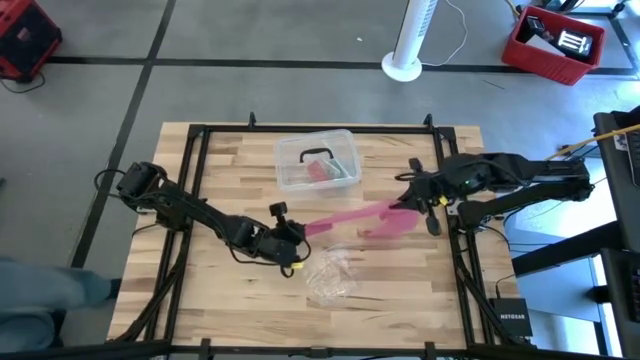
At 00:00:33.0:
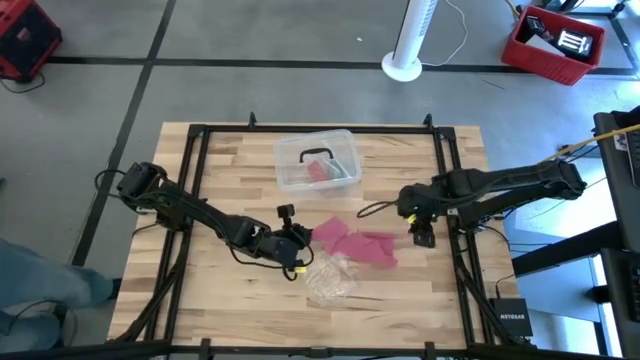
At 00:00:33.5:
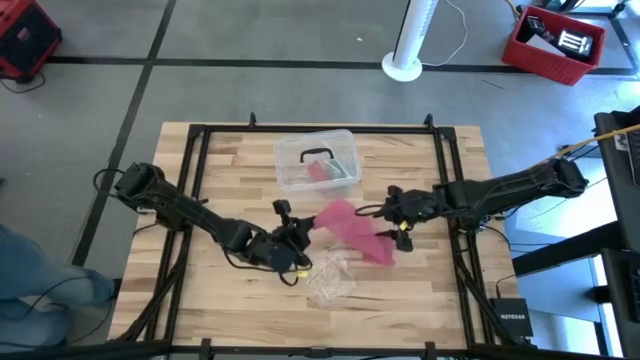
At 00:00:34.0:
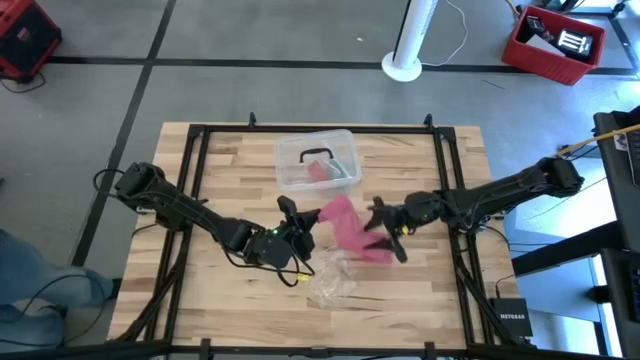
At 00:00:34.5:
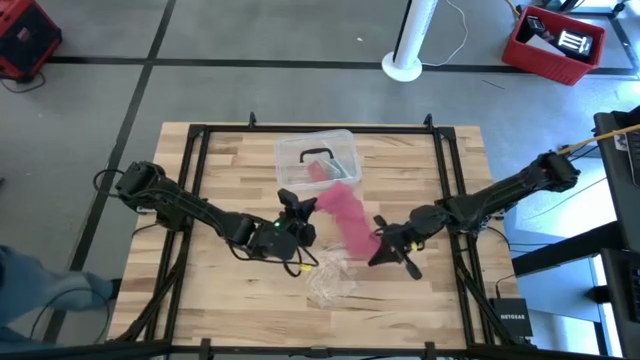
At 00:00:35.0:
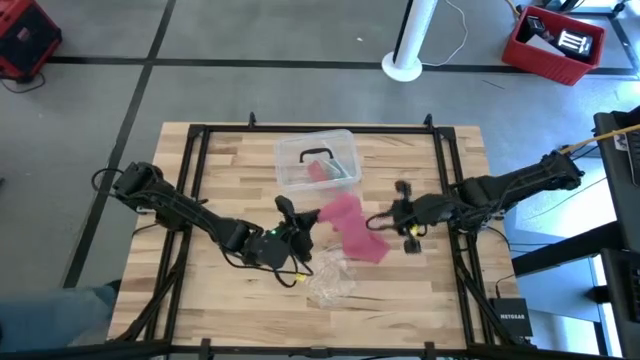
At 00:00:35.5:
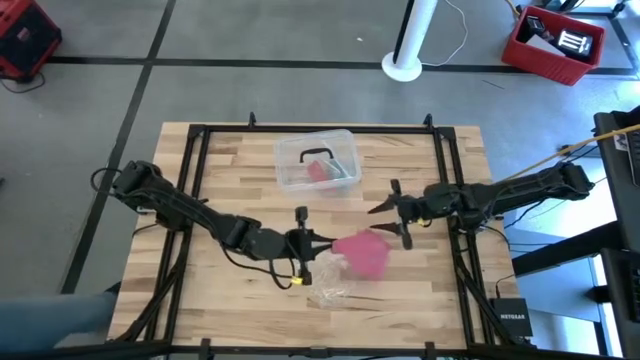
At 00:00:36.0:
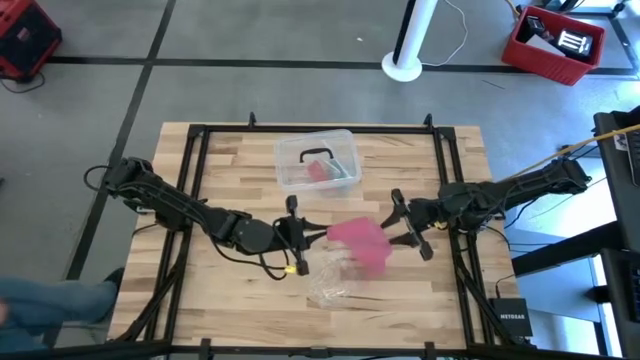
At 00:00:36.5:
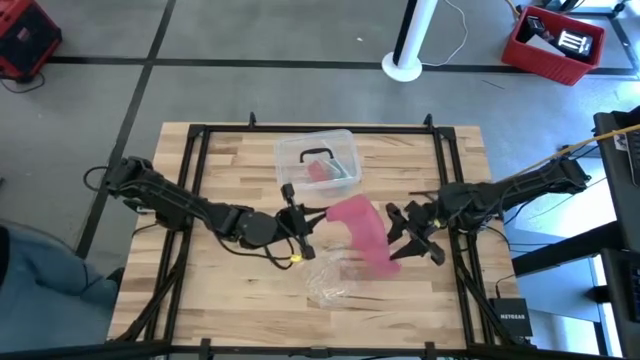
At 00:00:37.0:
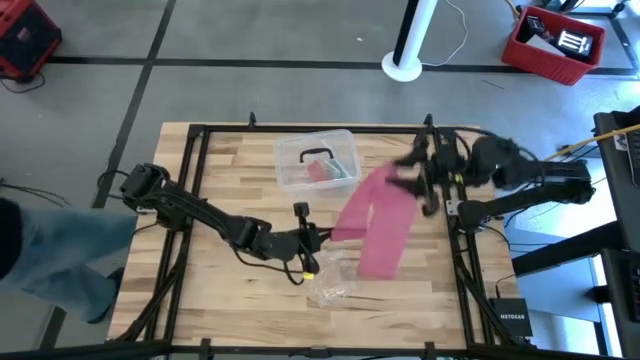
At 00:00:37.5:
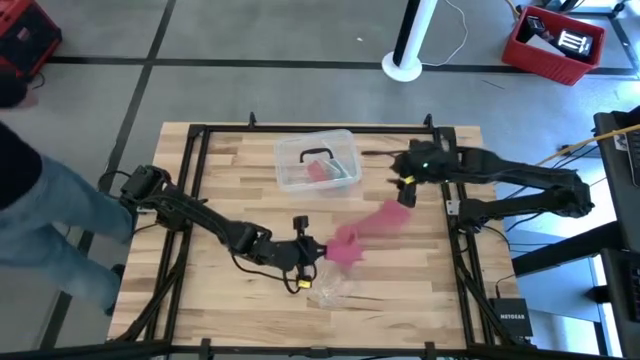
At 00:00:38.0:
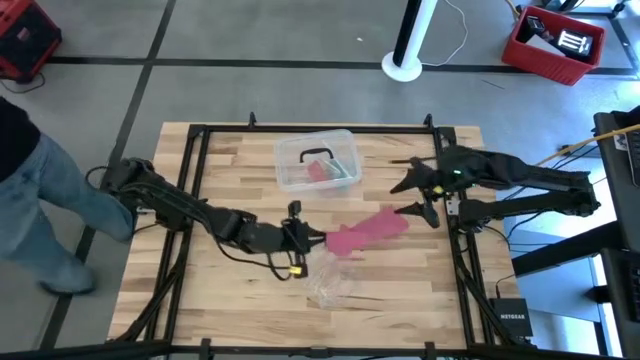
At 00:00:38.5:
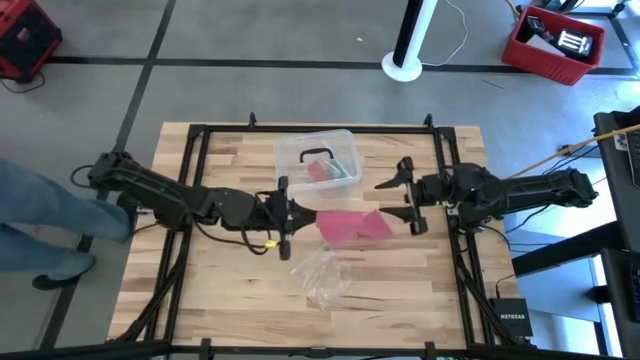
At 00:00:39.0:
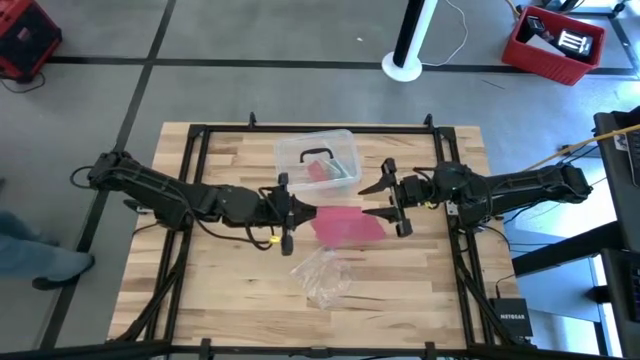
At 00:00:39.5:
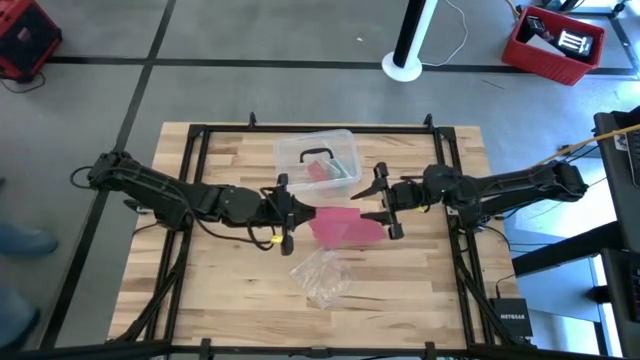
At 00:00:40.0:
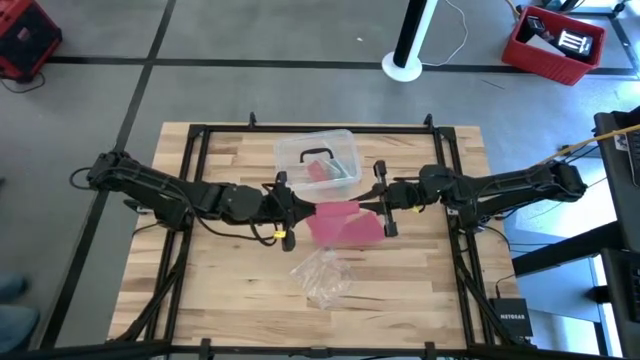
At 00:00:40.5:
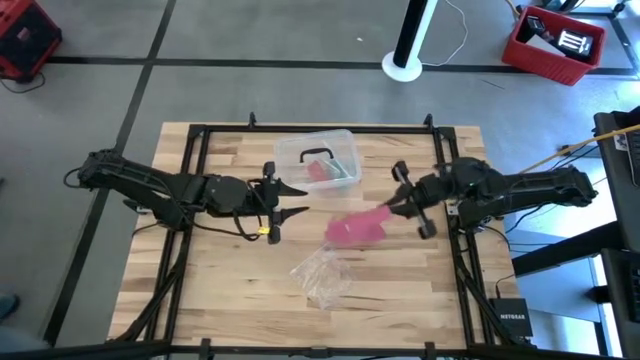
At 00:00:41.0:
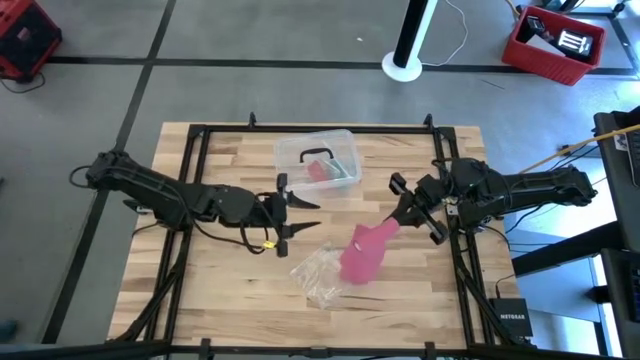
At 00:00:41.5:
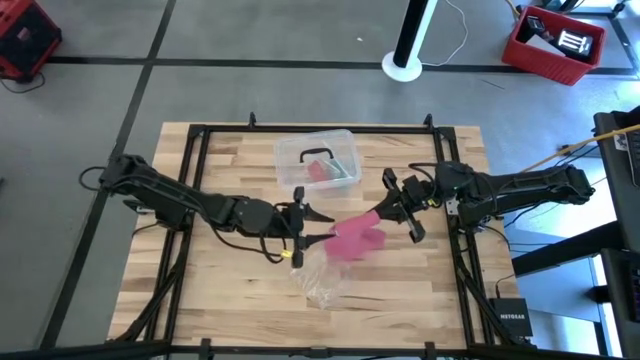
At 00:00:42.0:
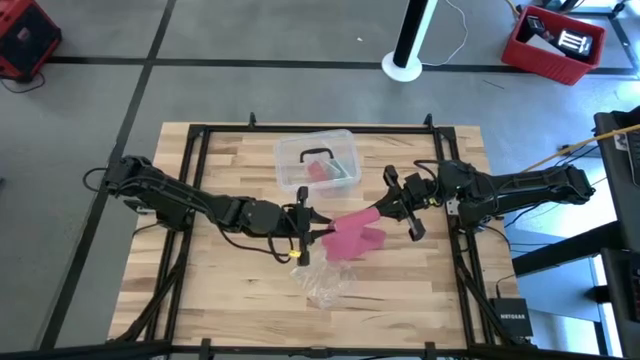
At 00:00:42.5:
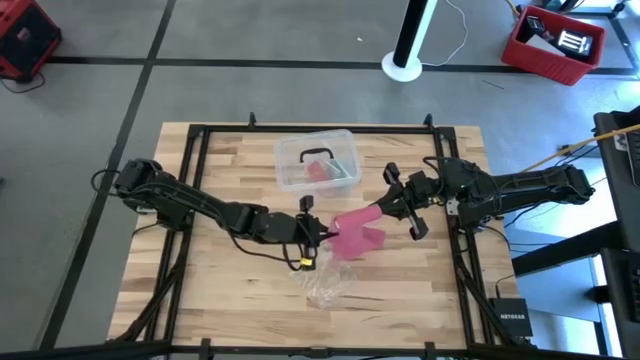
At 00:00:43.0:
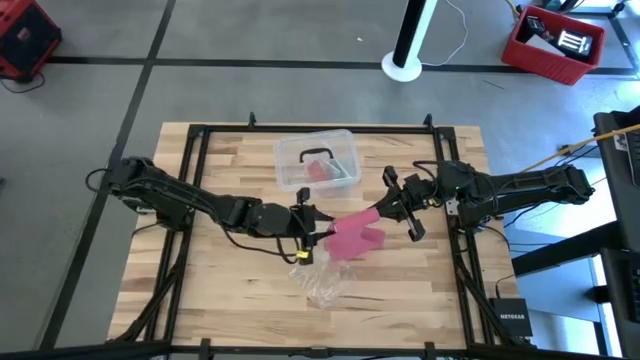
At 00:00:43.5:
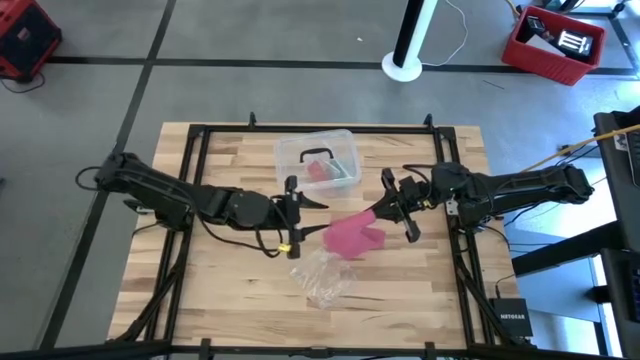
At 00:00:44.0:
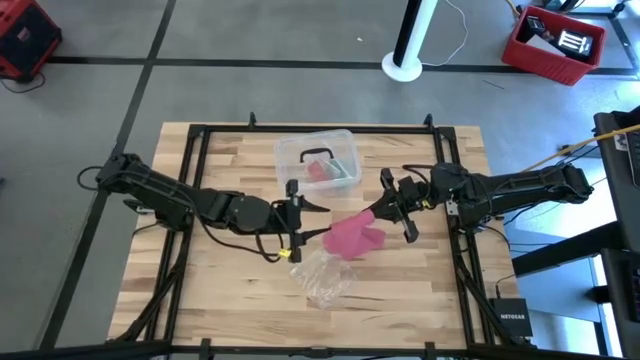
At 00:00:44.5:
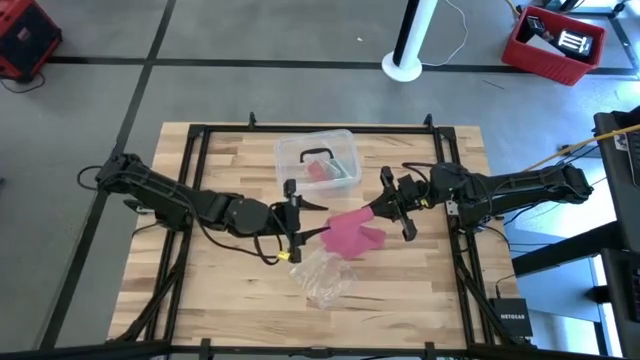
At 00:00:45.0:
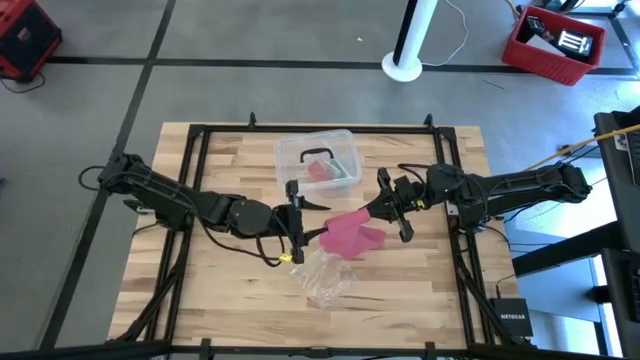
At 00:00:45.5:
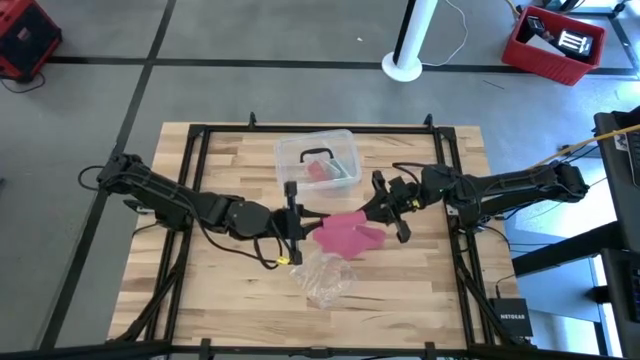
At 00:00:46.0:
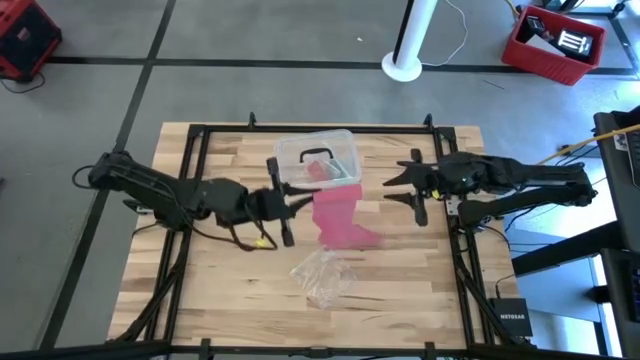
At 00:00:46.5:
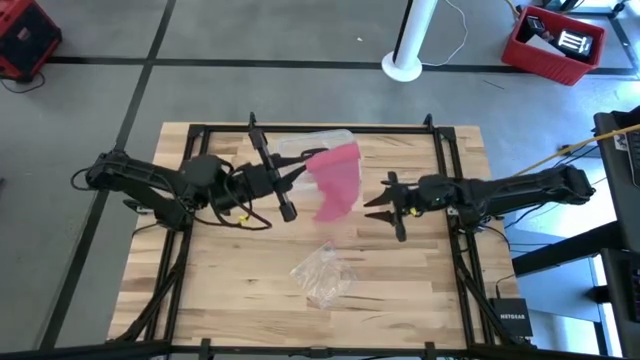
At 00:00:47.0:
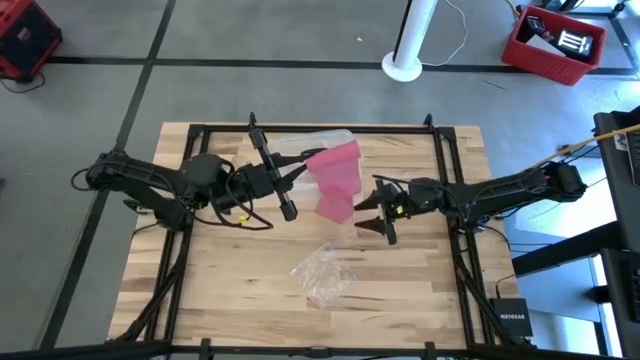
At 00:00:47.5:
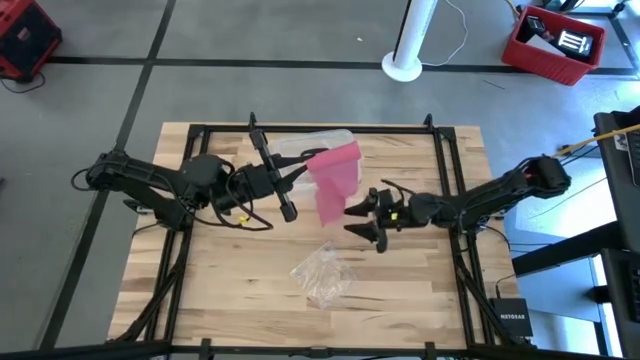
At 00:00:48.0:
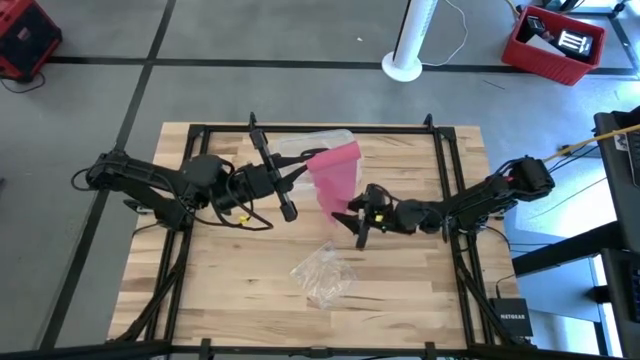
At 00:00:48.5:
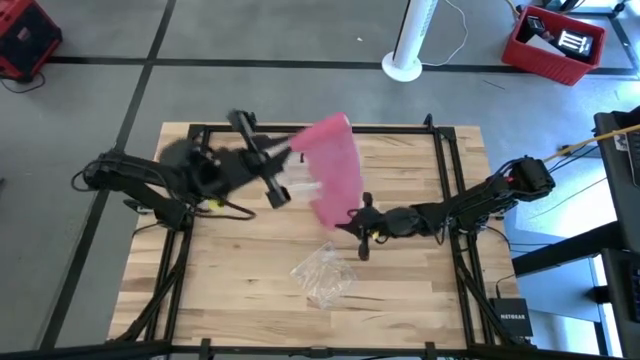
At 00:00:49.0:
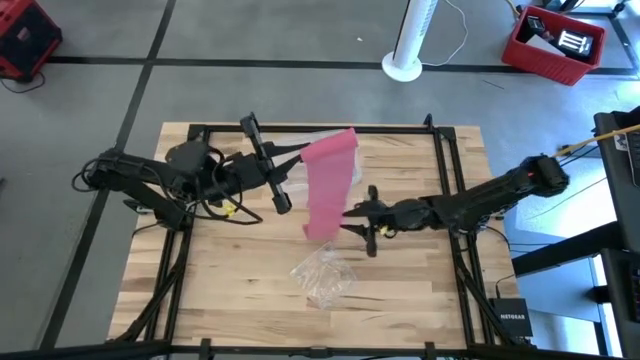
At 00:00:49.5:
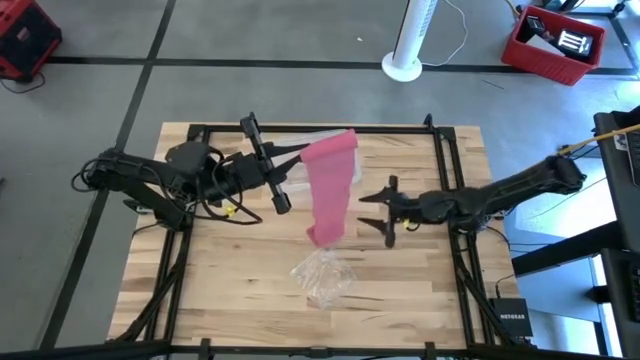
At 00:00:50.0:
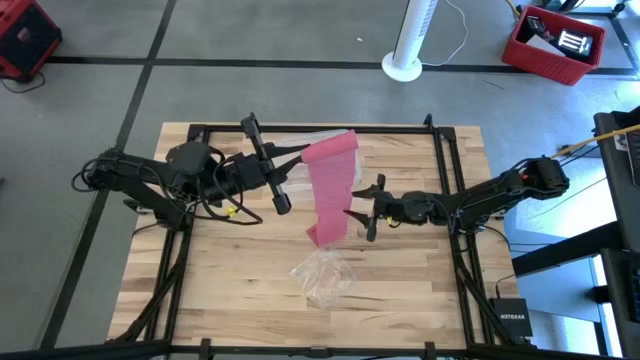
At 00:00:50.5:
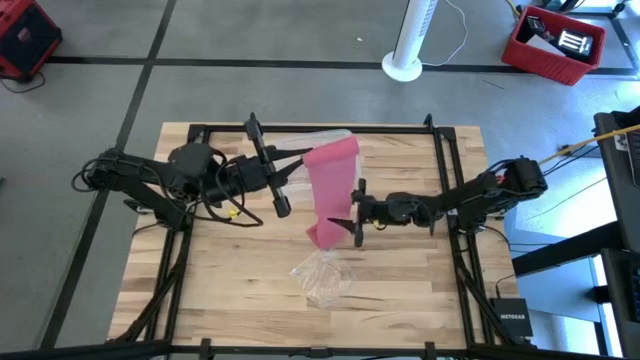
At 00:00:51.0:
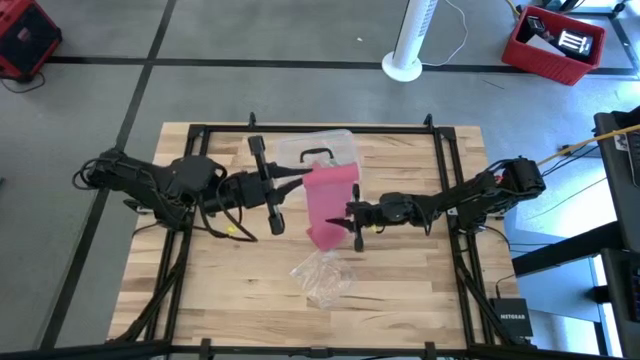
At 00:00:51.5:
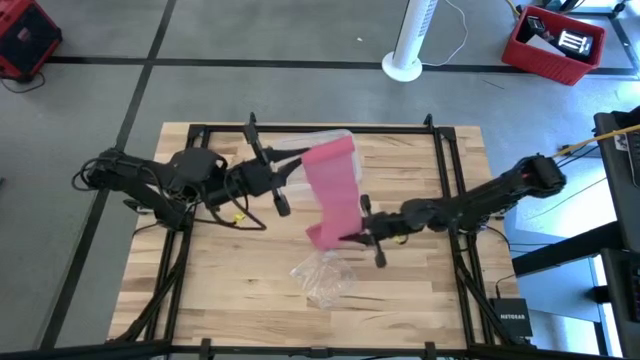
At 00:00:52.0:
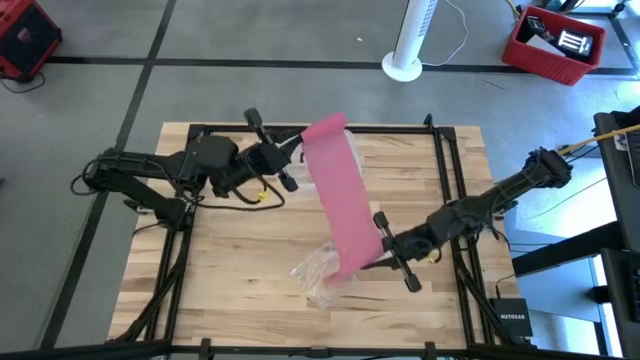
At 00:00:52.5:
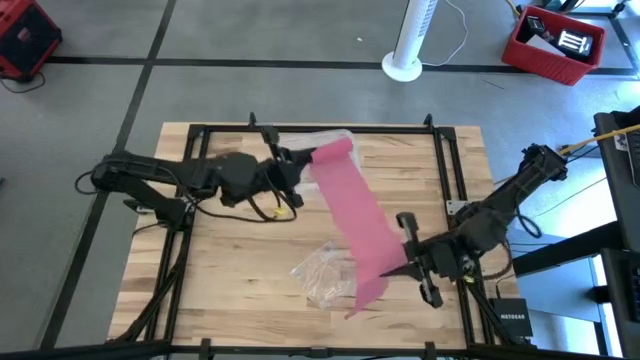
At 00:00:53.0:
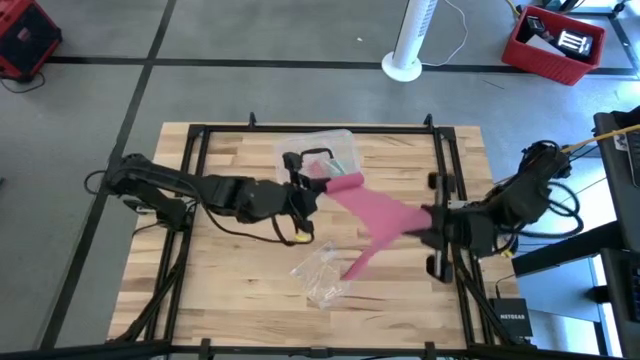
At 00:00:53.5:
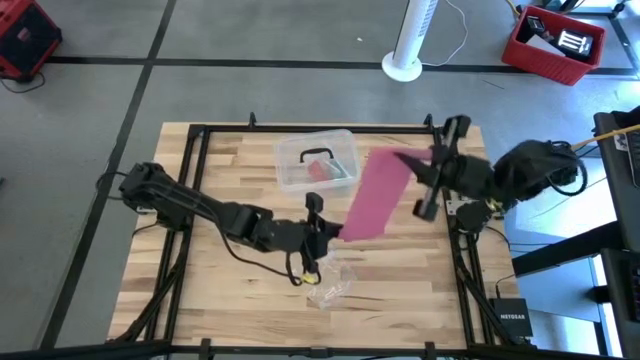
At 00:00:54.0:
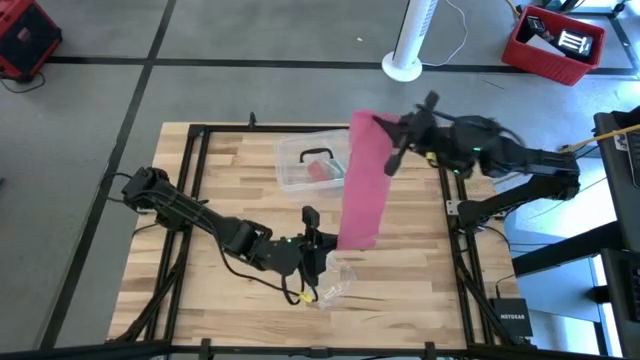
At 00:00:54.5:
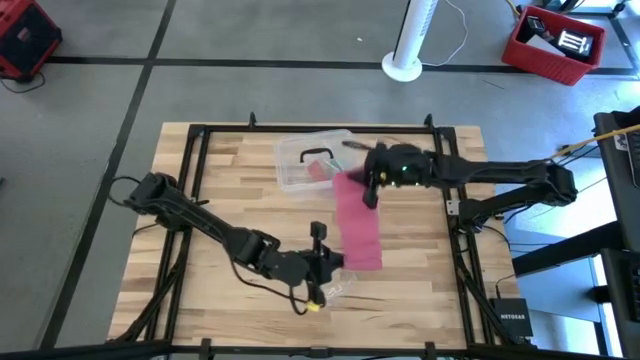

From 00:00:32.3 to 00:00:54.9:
Task: Roll bandage
Roll the pink bandage
